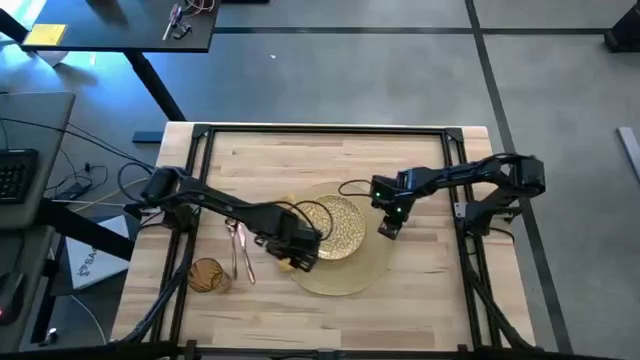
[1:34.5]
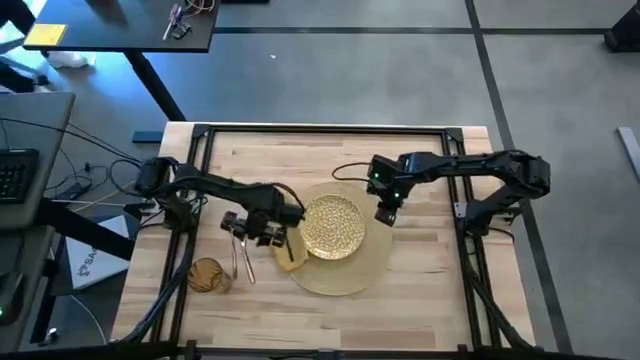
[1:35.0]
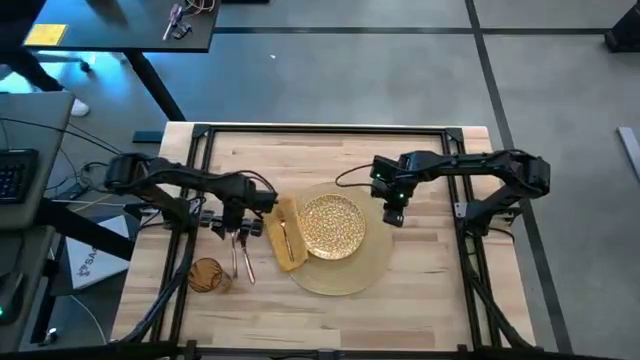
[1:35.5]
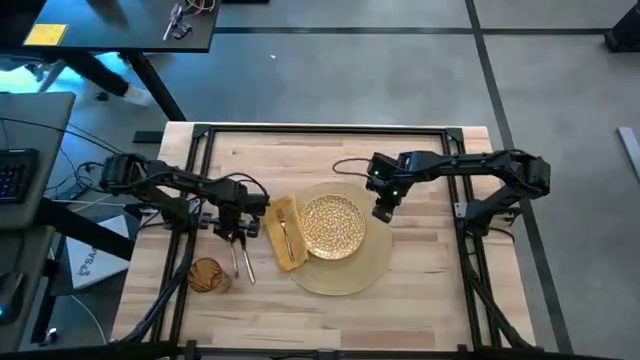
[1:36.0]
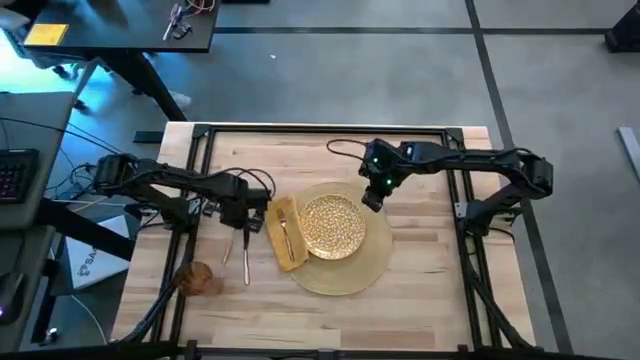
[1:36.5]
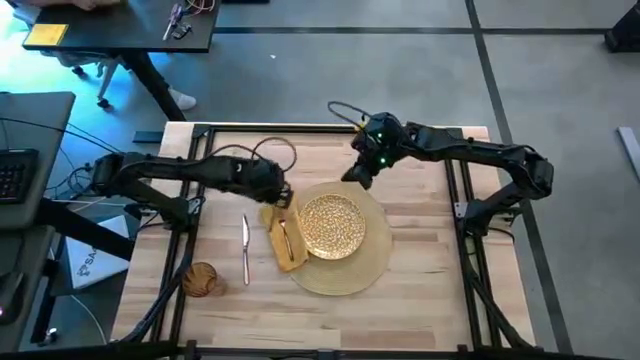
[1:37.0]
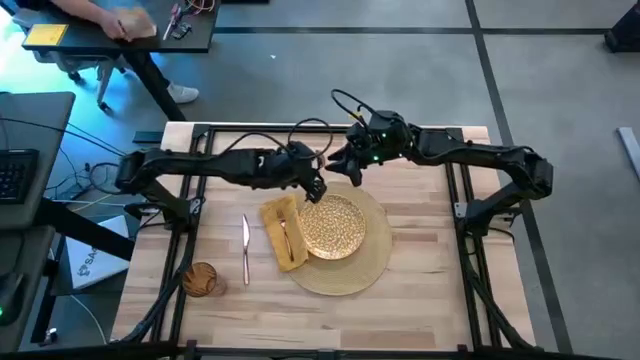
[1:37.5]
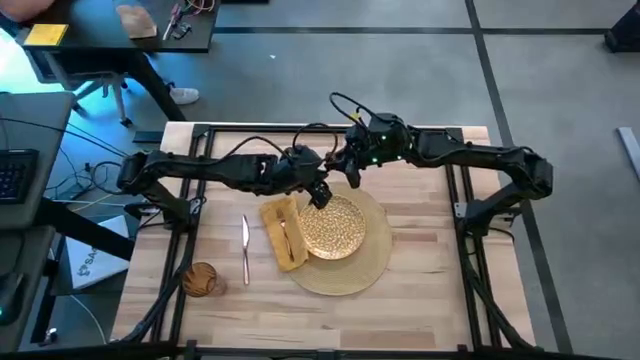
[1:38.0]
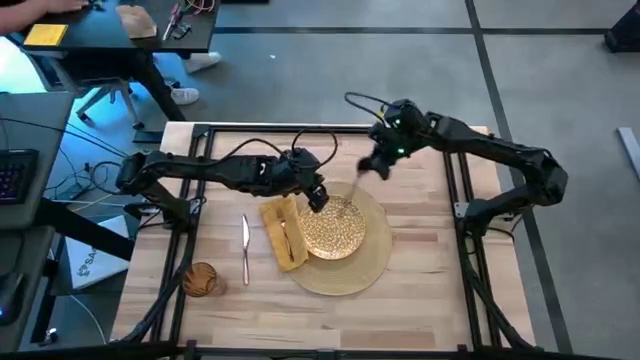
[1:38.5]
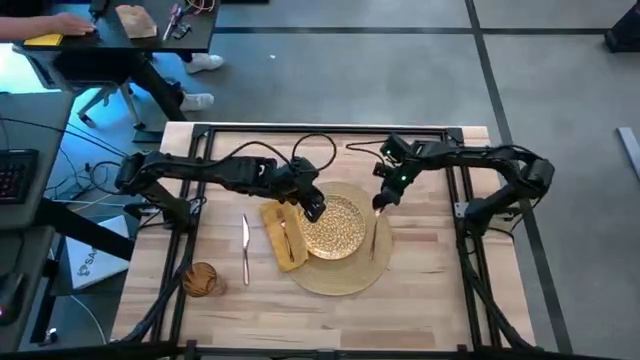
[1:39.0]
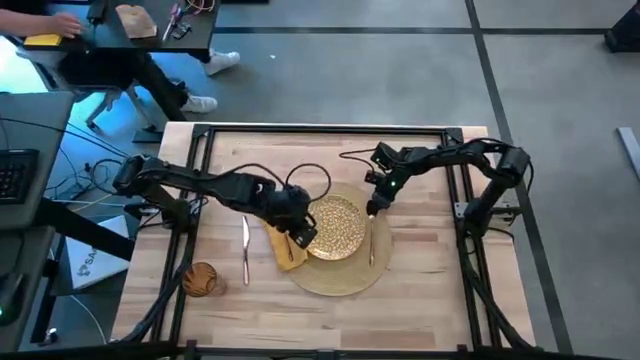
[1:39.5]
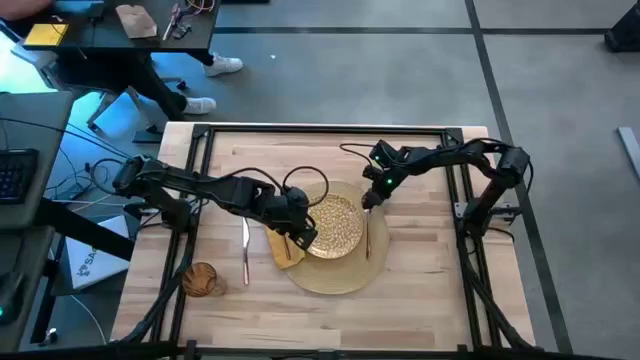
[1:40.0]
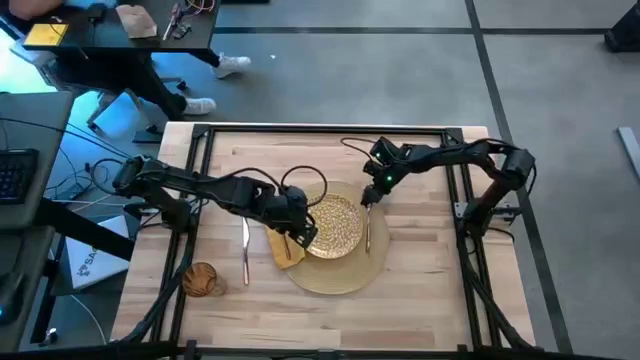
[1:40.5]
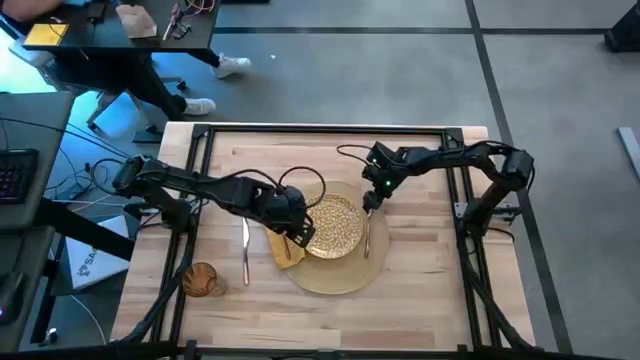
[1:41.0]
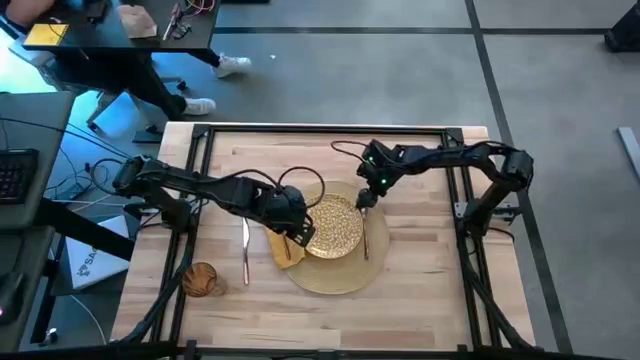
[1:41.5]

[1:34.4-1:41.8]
Task: Set table place
Put the brown spoon on the brown placemat to the right of the yellow plate

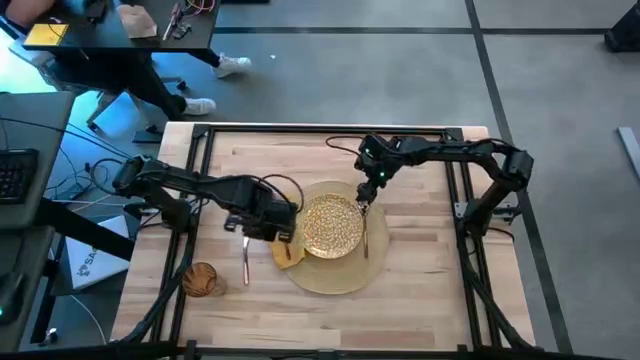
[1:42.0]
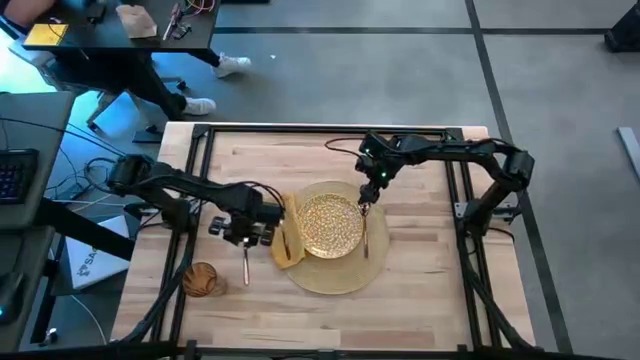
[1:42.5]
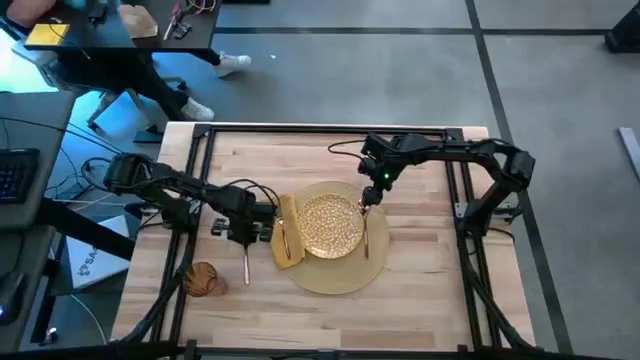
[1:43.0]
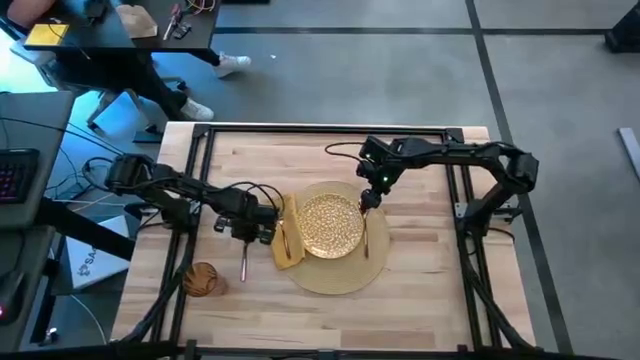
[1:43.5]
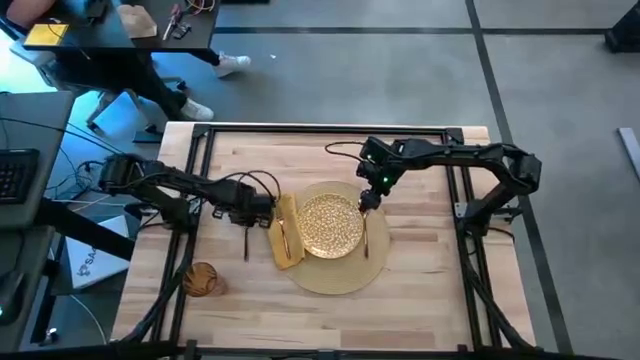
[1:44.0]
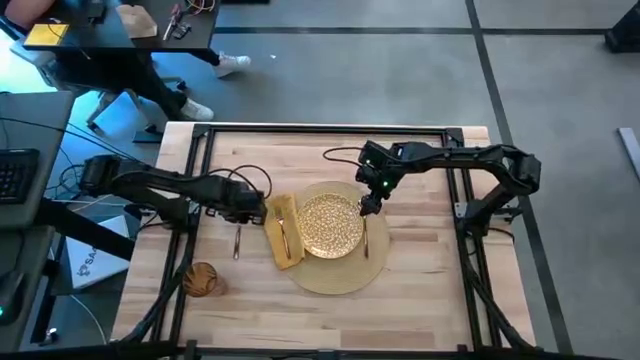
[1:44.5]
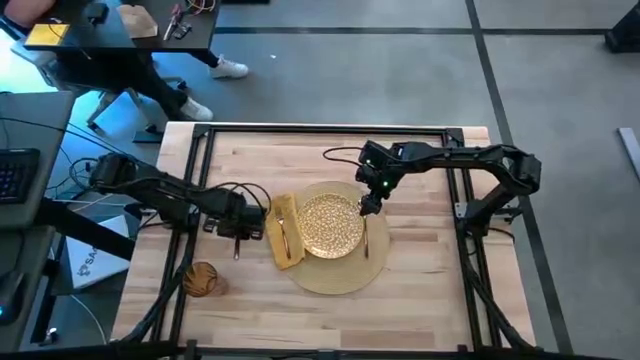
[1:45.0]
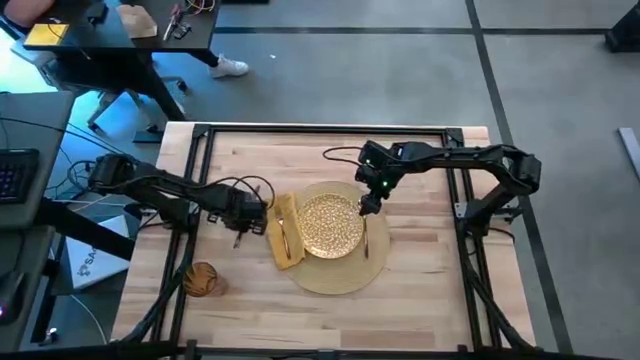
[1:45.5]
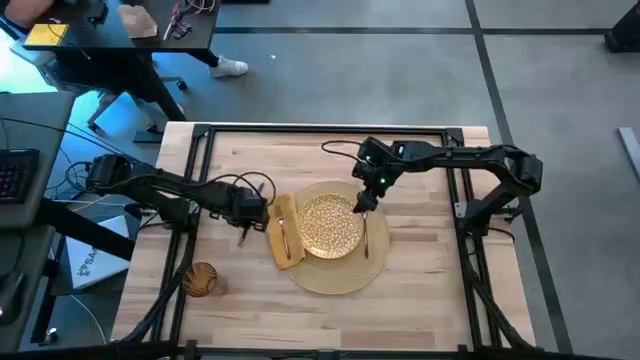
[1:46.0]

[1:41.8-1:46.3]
Put the brown table knife on the brown placemat to the right of the brown spoon

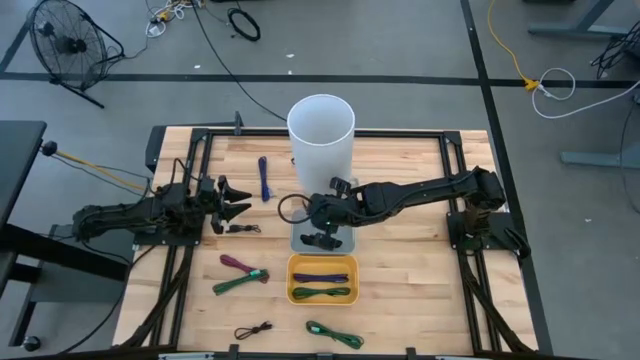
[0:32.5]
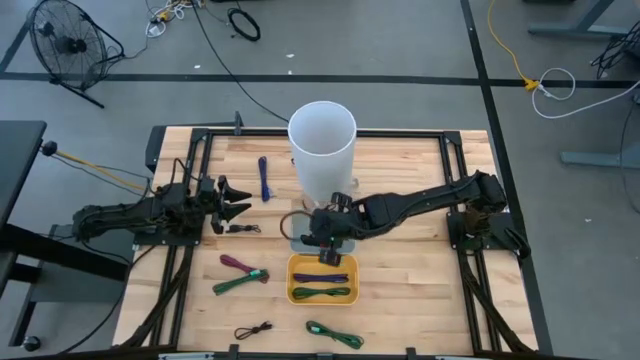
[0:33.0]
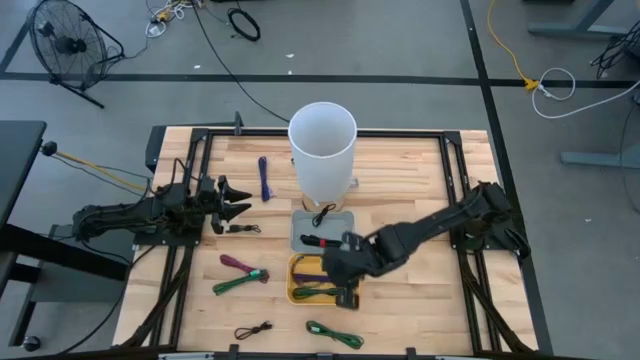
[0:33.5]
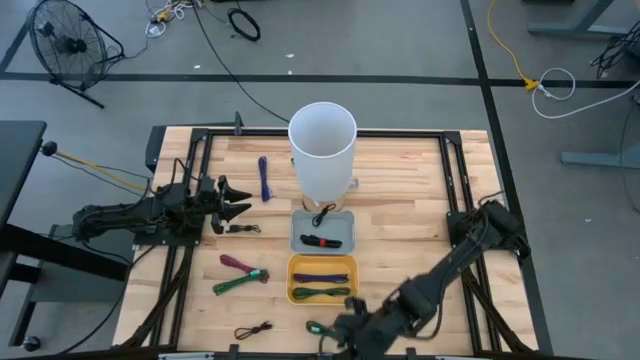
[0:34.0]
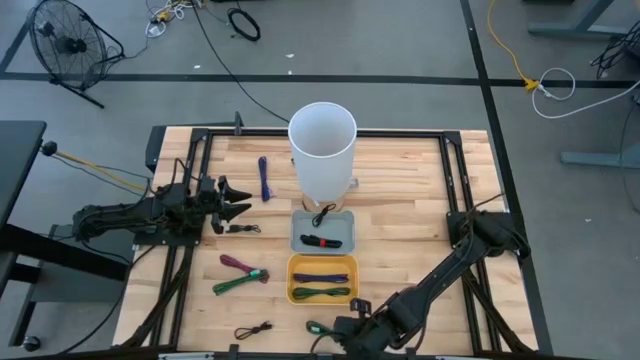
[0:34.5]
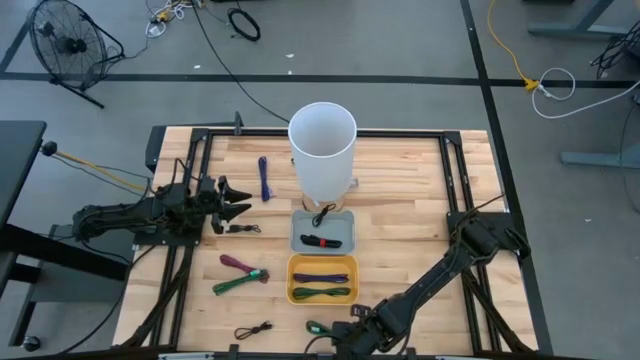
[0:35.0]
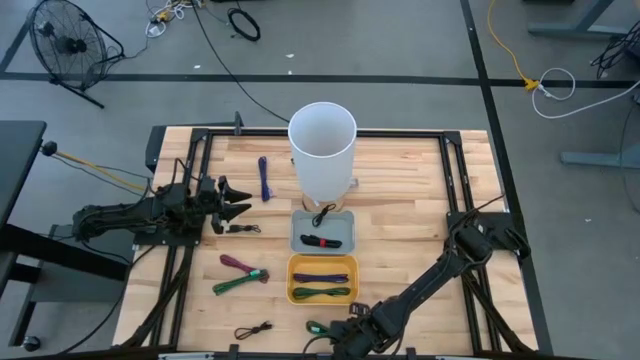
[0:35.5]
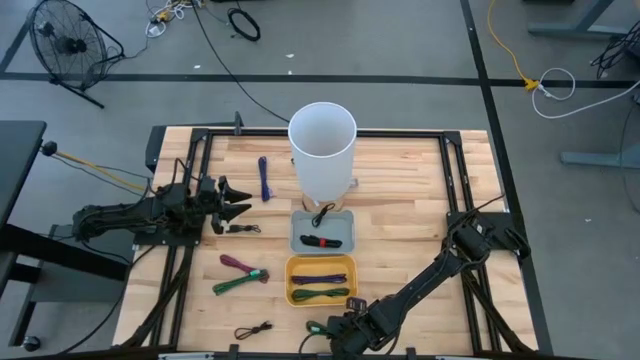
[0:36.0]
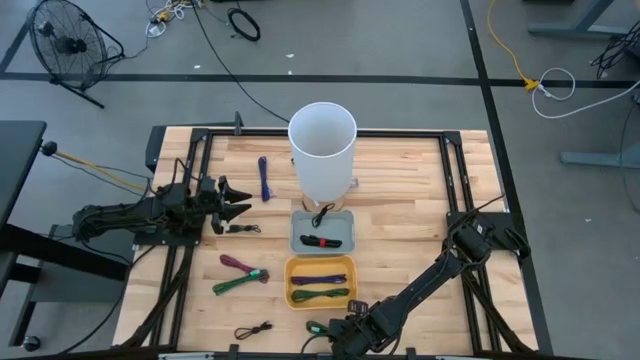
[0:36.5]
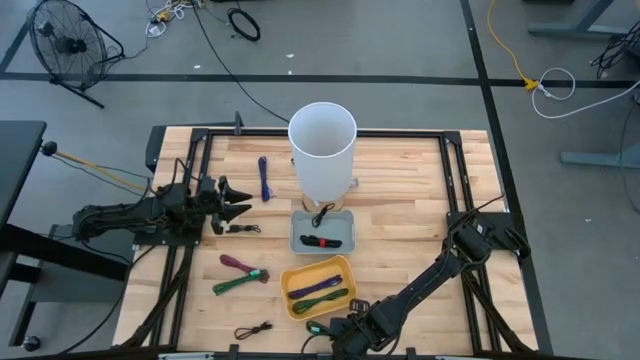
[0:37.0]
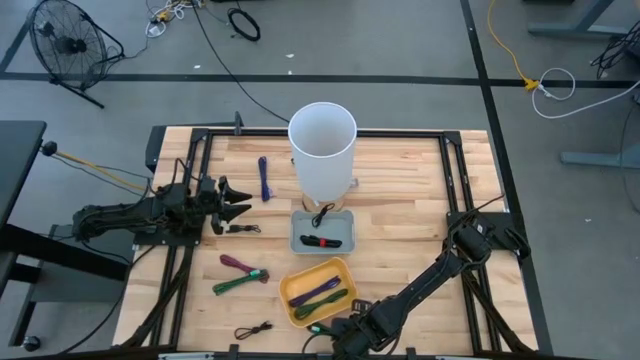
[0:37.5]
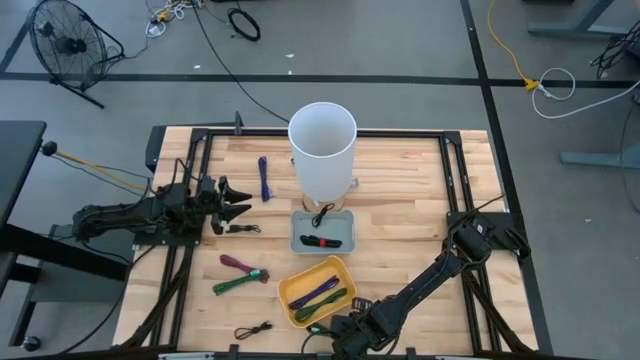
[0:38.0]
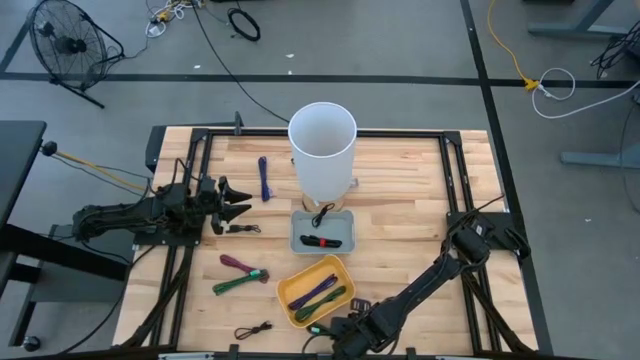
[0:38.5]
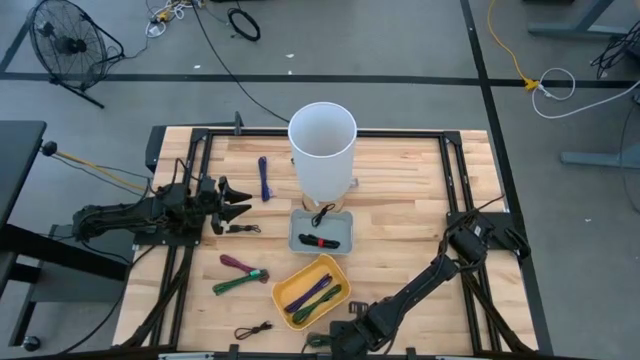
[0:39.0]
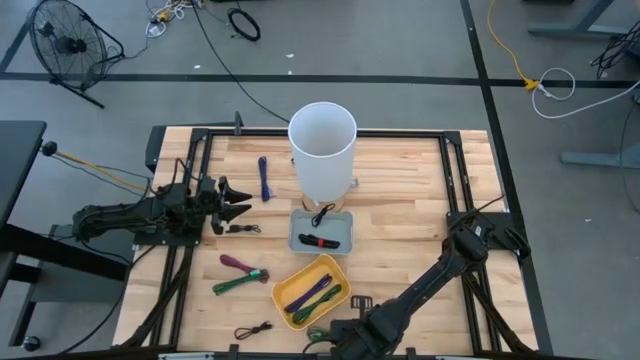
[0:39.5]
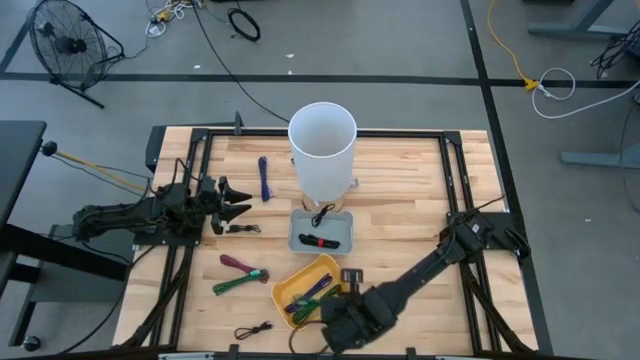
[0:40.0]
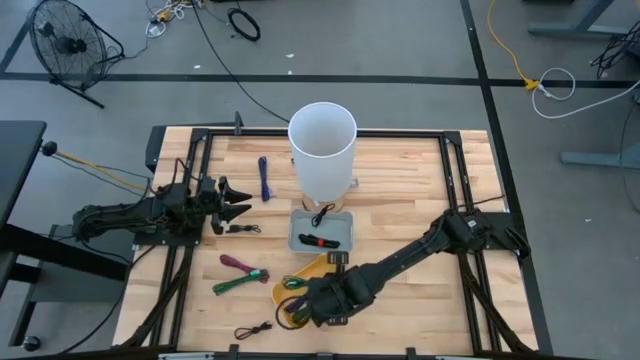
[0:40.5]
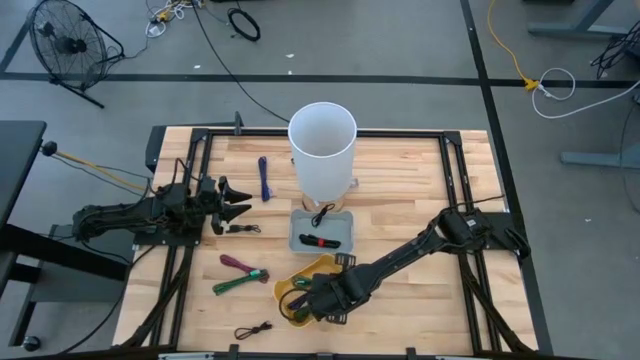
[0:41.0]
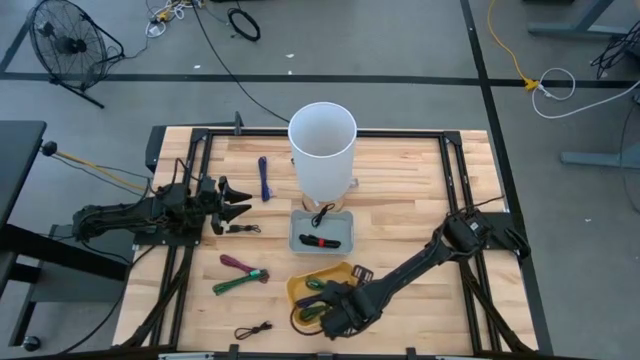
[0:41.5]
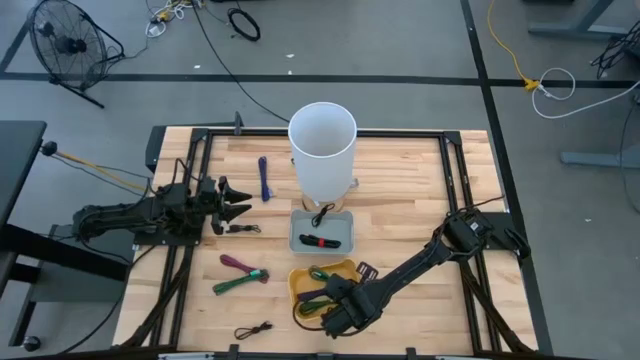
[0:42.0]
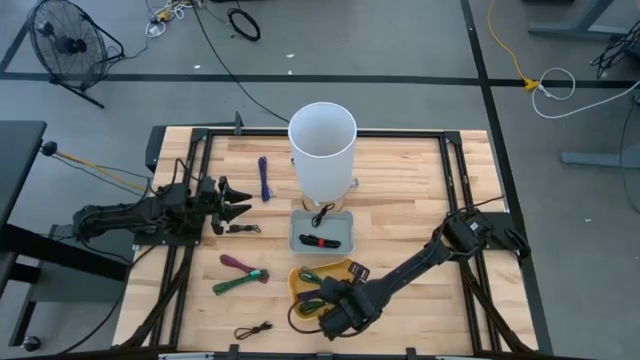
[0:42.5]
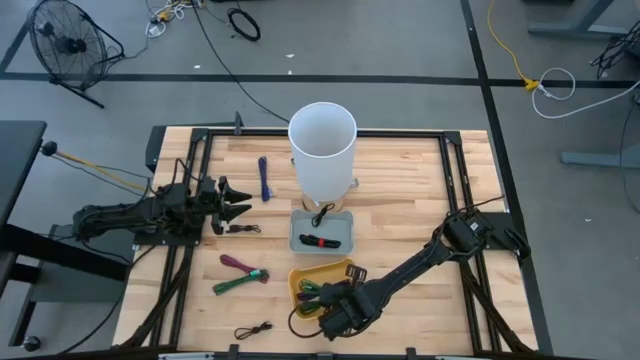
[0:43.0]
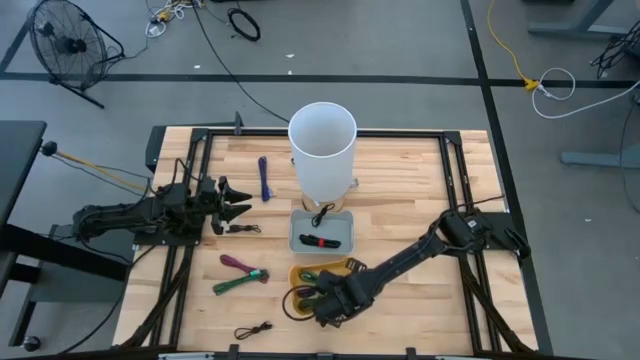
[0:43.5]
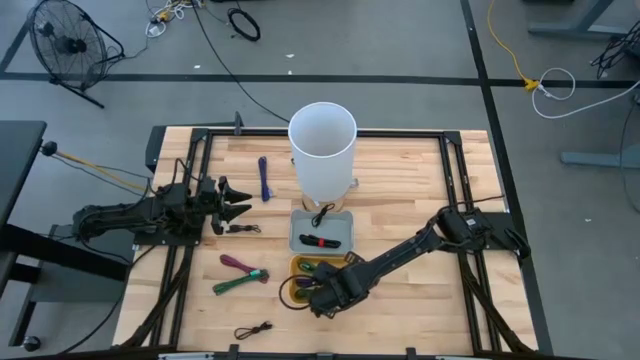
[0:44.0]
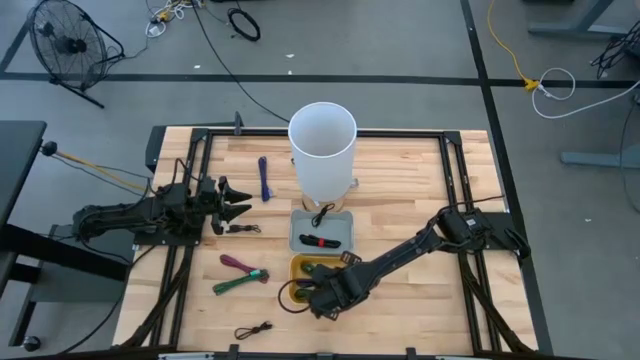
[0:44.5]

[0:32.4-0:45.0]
Task: Pick & Place USB Port
Put the green charger cable into the yellow bin
